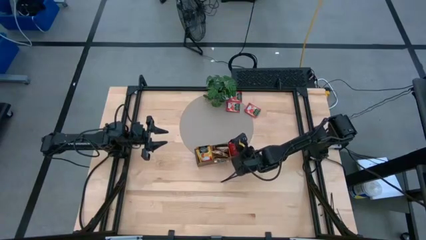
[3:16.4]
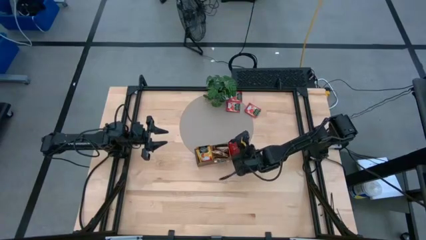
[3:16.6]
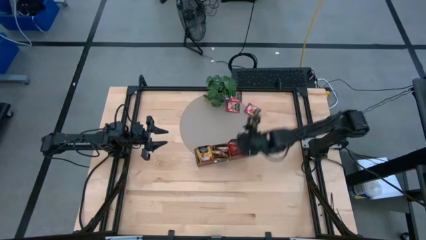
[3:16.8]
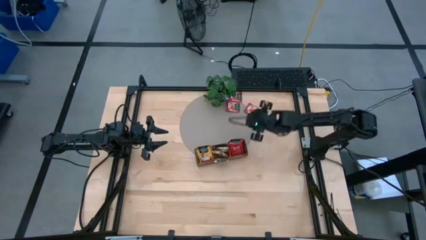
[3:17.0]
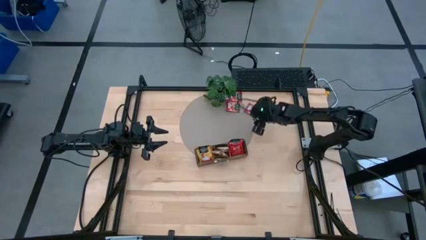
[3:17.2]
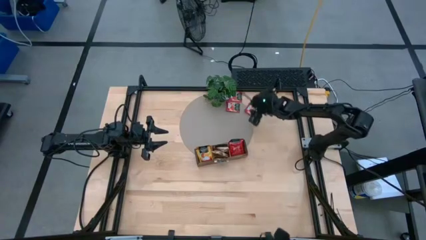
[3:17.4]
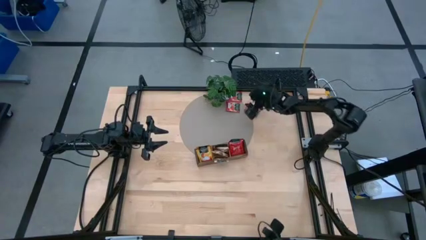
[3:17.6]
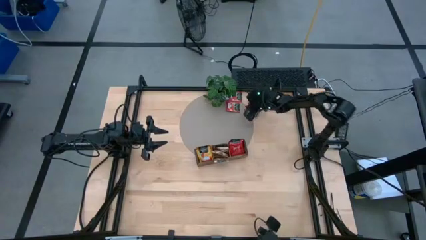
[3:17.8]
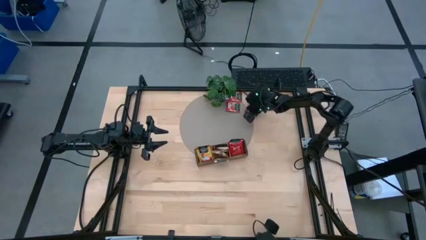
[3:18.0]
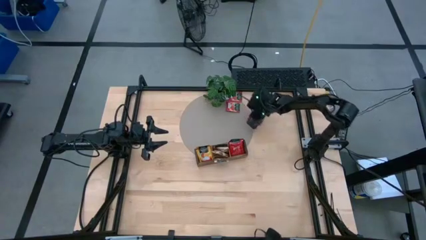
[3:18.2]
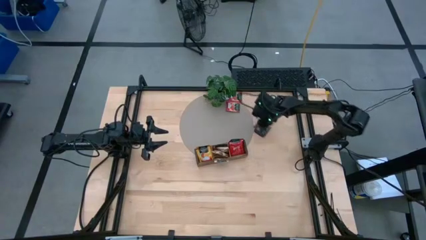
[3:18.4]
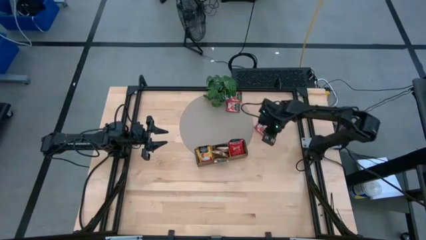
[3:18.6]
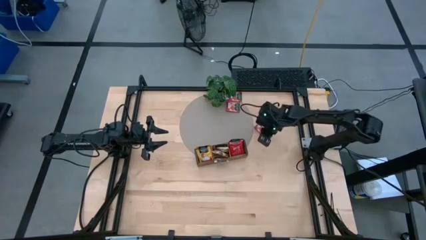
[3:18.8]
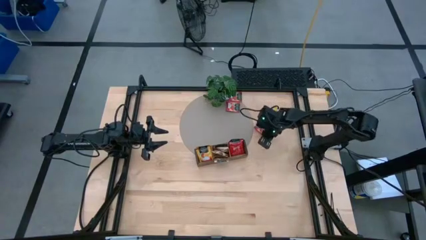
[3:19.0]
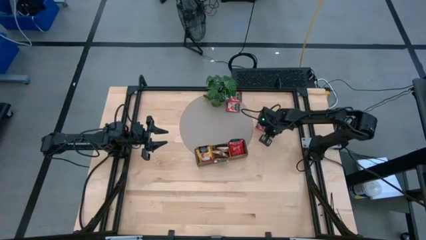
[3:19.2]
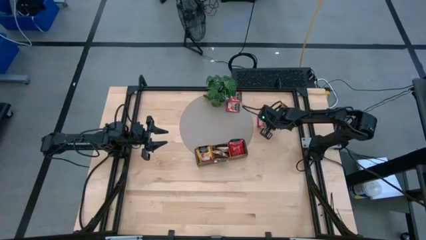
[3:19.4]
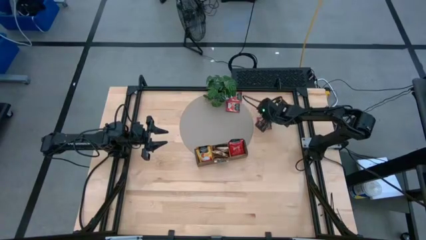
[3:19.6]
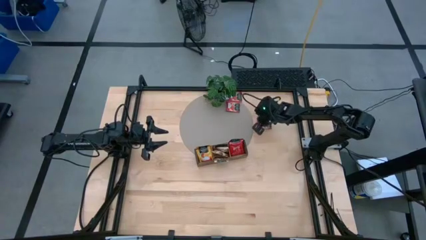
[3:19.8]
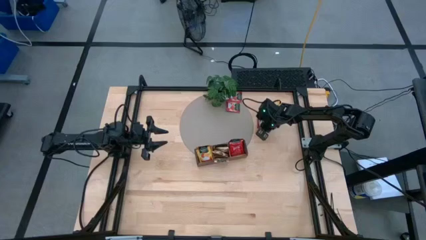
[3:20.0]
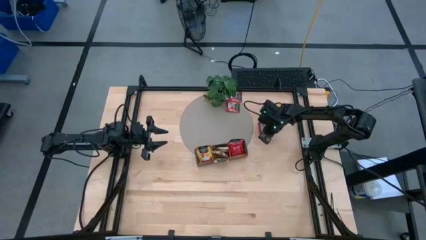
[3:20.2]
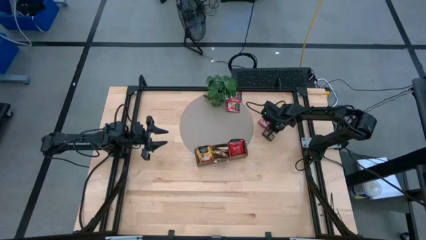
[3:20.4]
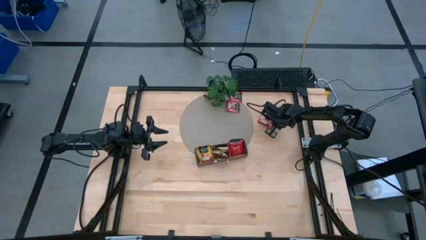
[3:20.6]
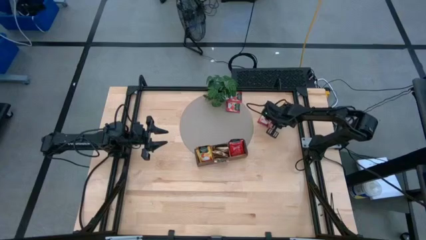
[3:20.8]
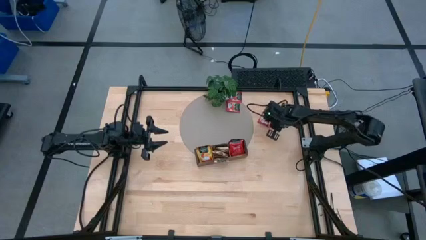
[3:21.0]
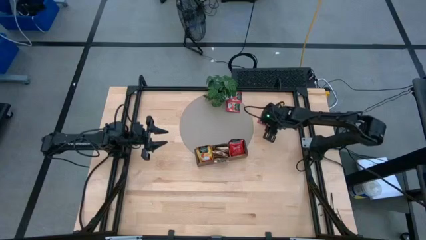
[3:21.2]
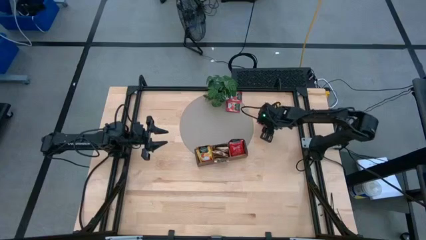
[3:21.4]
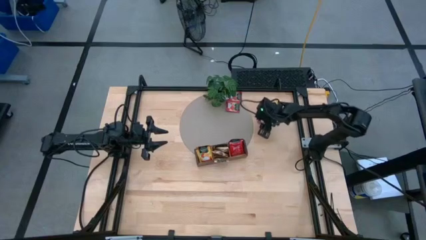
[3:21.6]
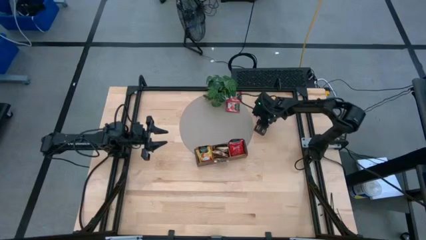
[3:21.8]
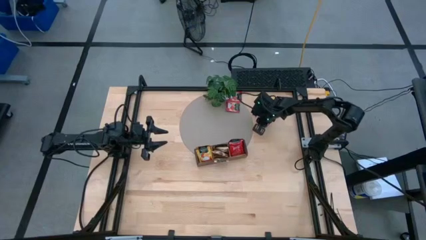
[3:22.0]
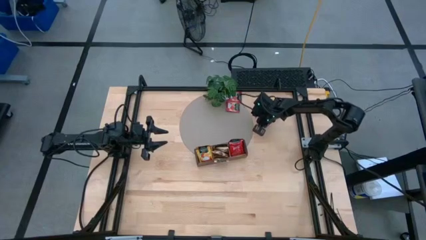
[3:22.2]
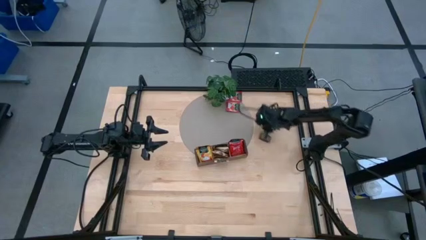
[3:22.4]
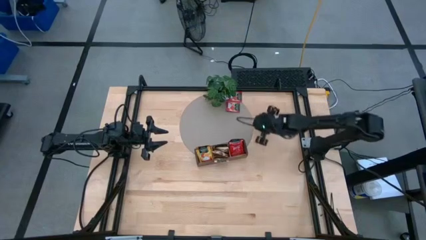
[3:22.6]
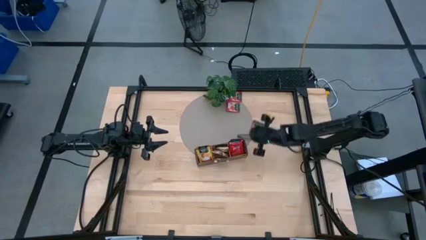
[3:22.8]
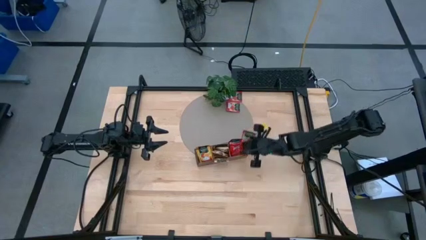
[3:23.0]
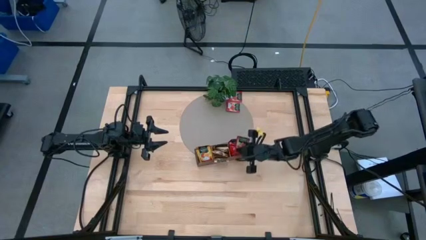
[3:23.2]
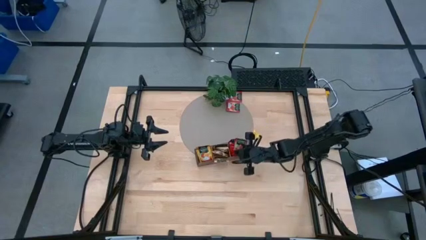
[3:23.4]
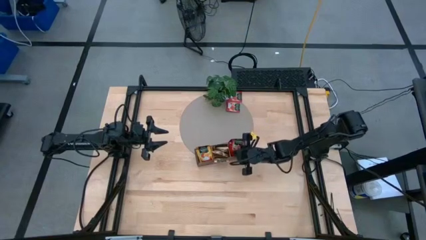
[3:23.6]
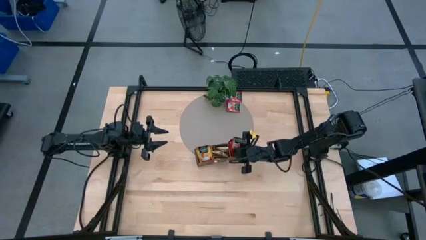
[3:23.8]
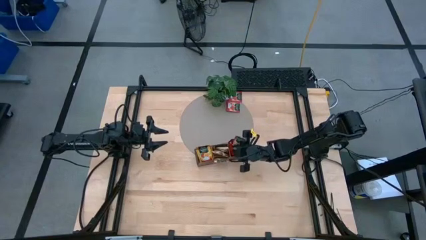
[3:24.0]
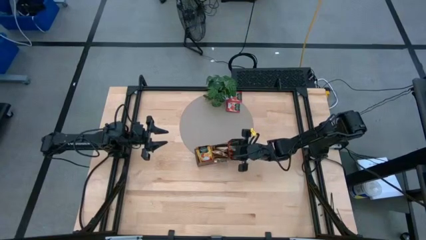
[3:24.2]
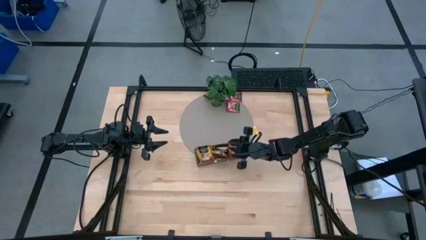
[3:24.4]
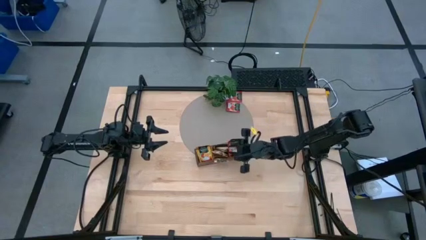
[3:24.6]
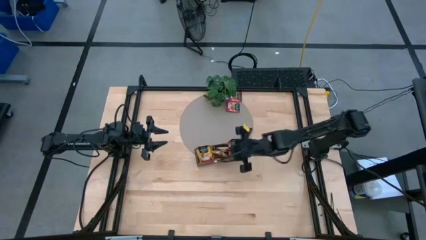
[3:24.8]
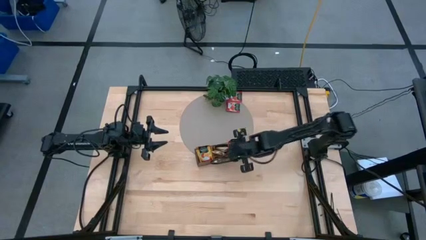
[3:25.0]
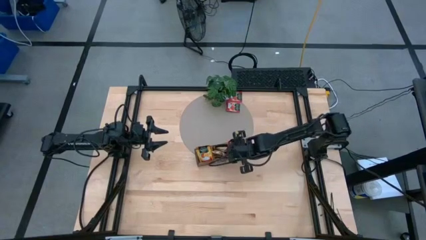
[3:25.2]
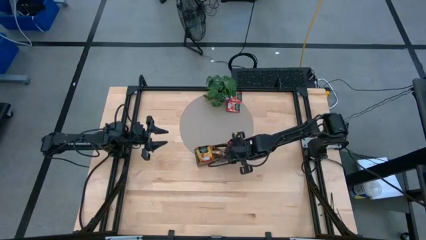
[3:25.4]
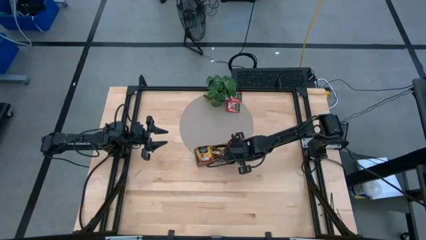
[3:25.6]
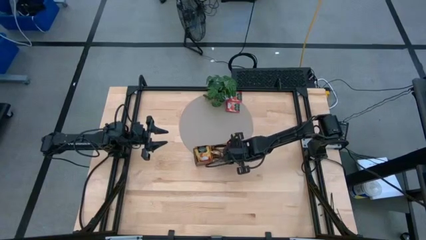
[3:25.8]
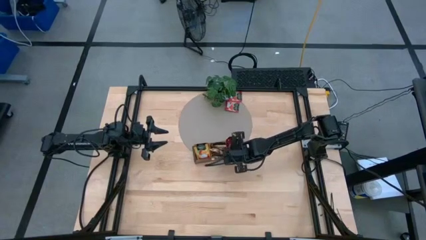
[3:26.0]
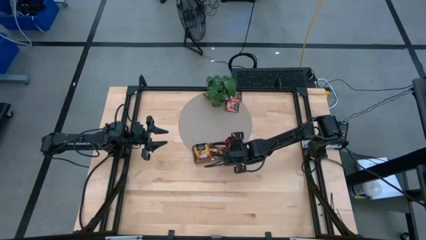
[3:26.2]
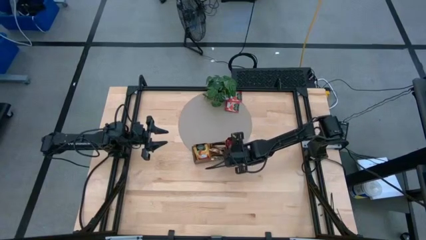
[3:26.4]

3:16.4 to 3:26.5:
Task: Pick & Place Tea
Put the right red tea bag into the right slot of the wooden organizer
